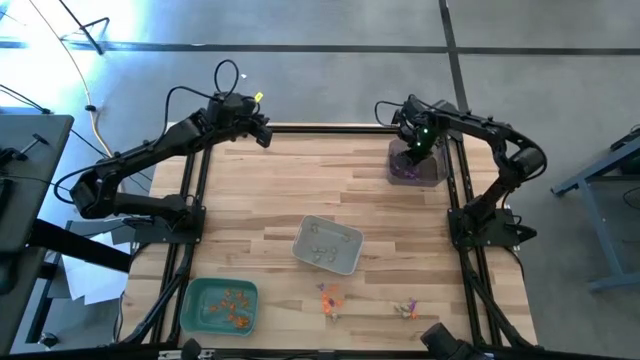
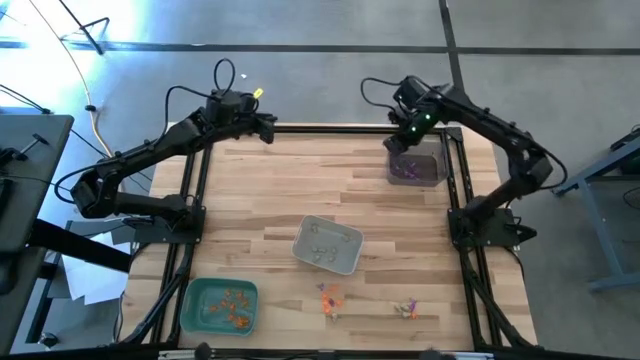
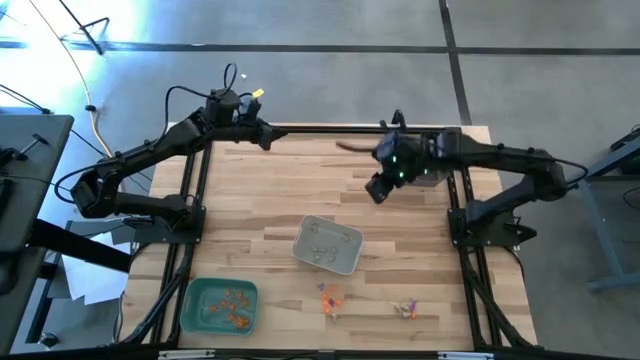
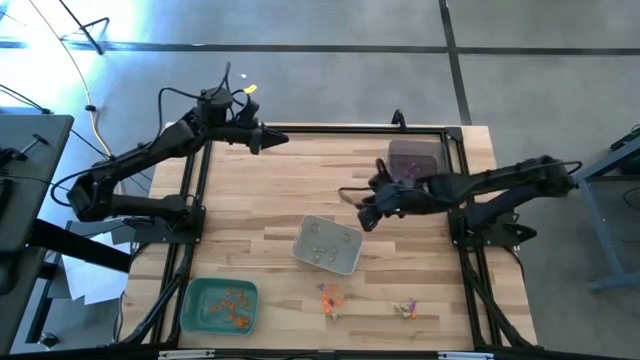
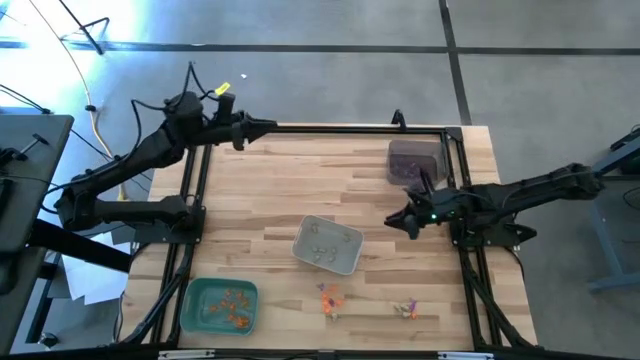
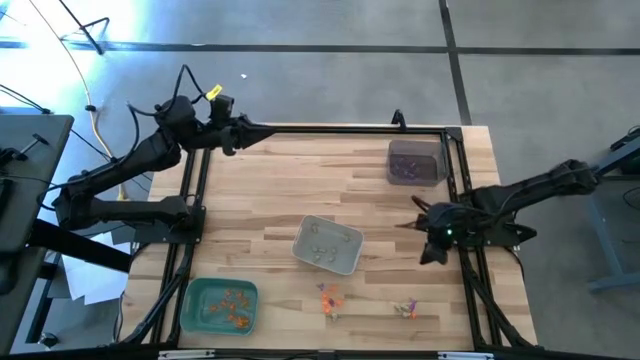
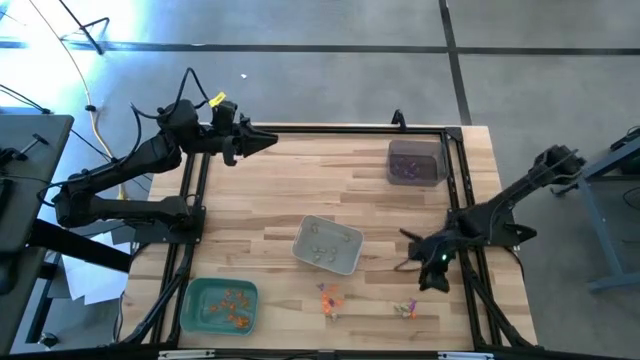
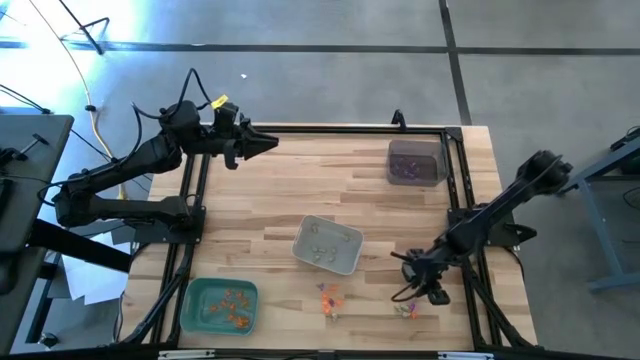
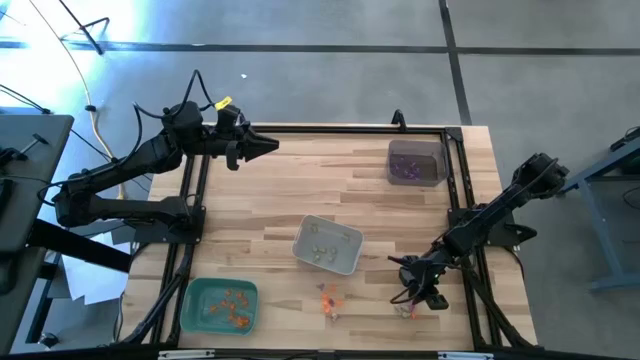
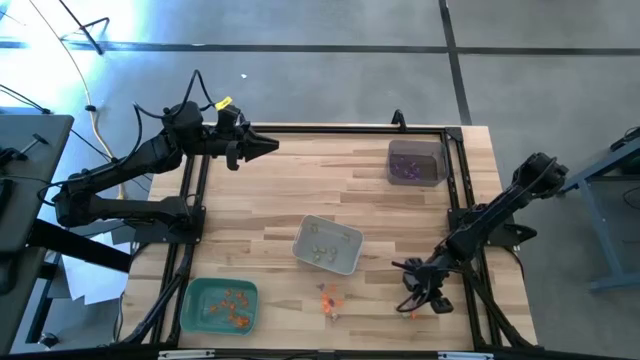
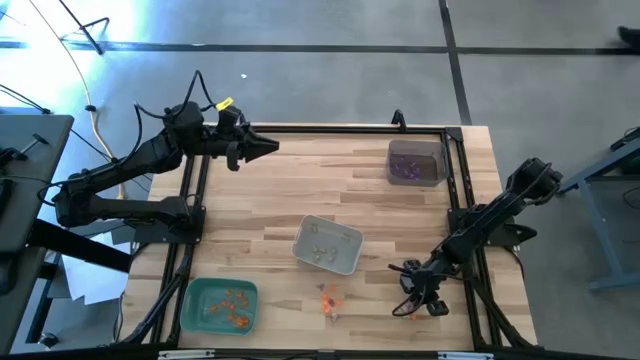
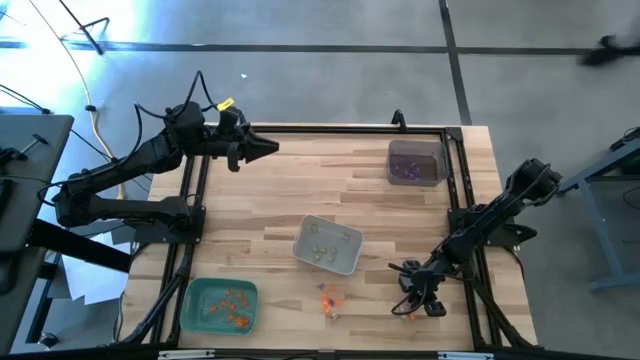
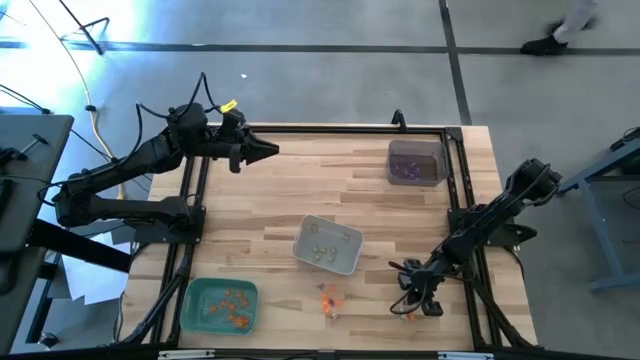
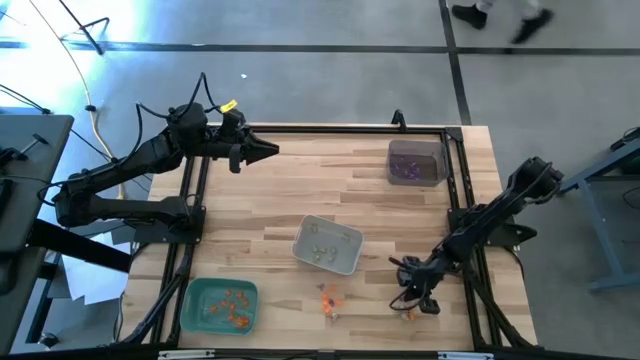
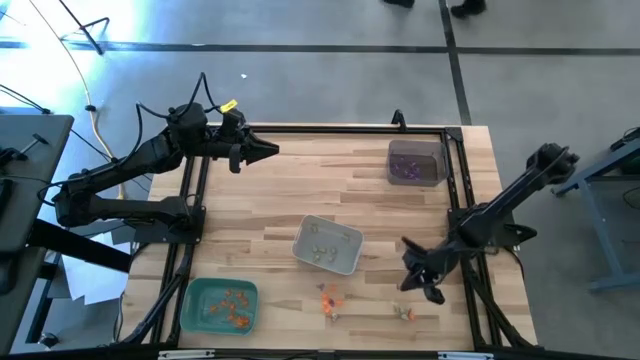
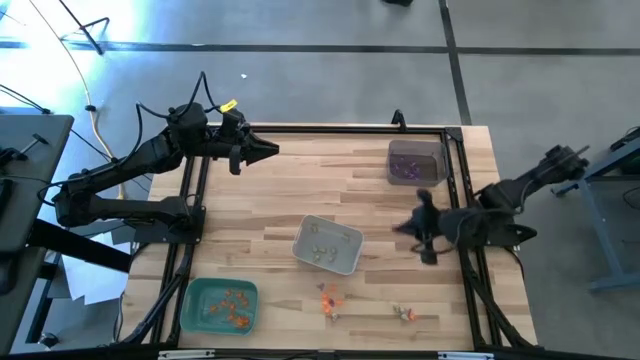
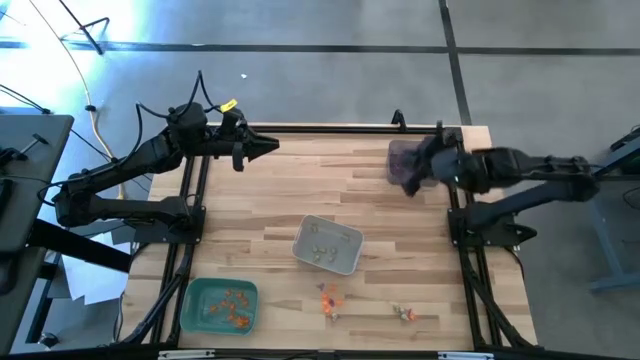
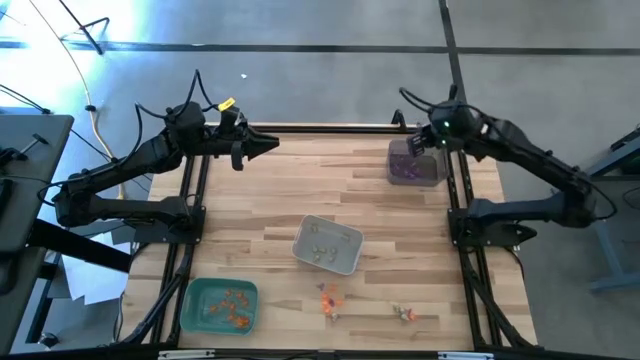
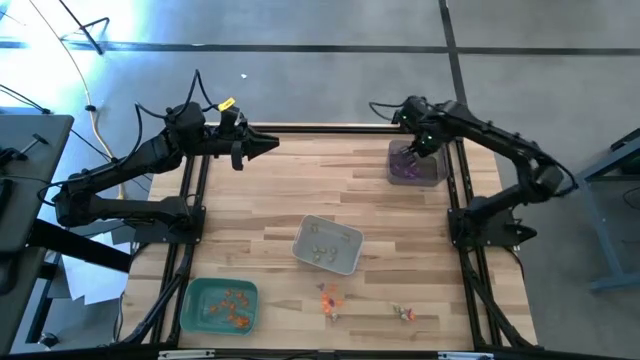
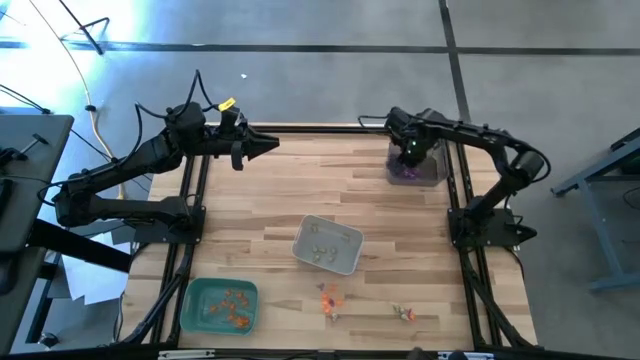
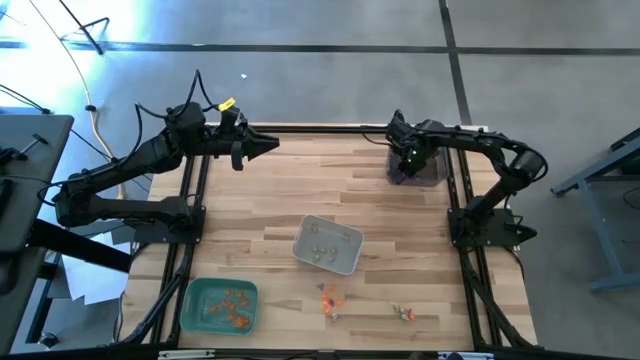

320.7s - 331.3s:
Task: Sort Halloween decoration
Put the violet witch hat toy into the black bin

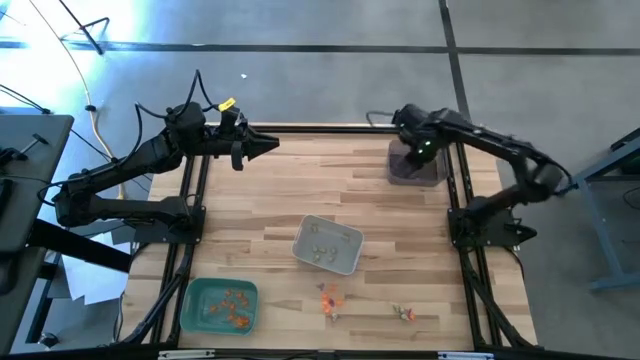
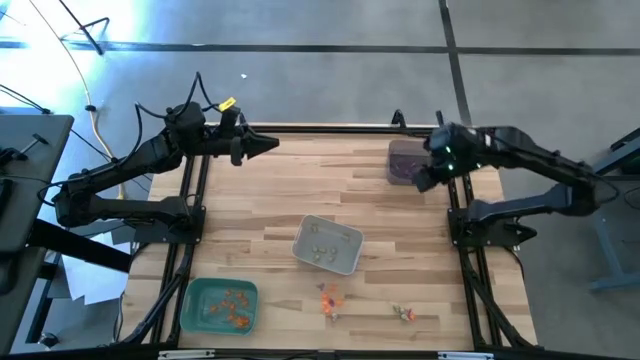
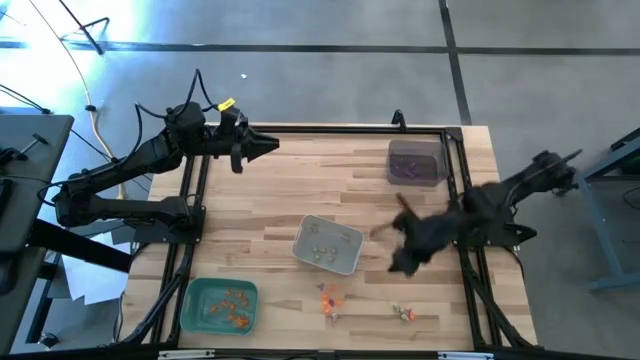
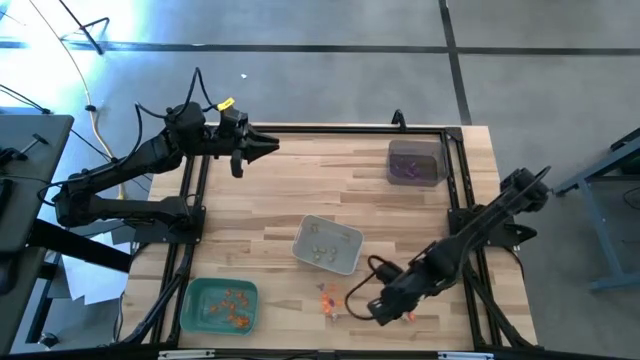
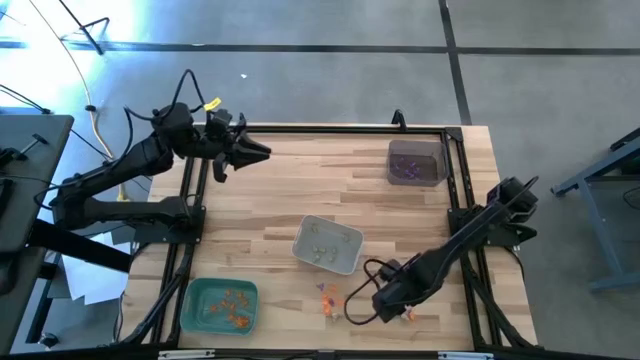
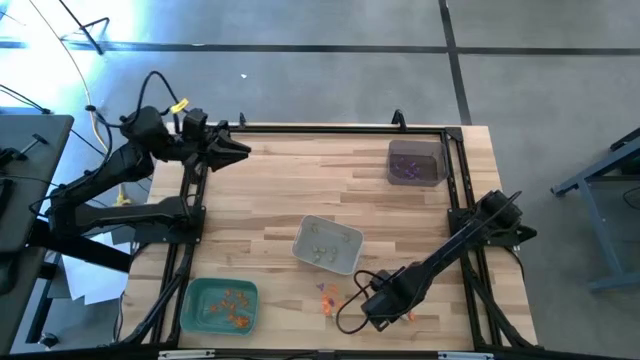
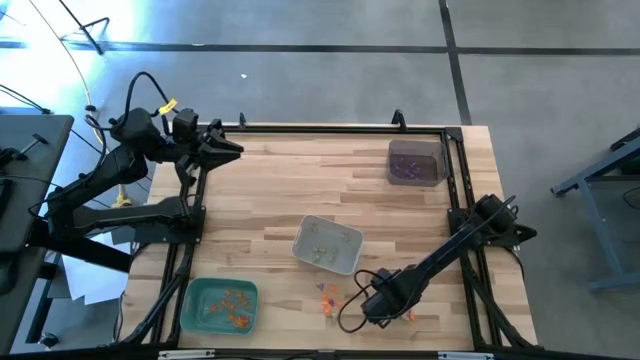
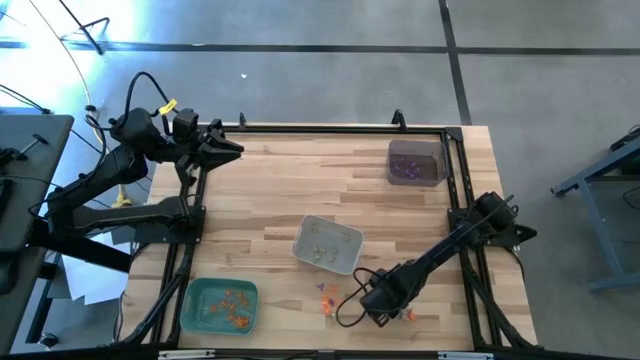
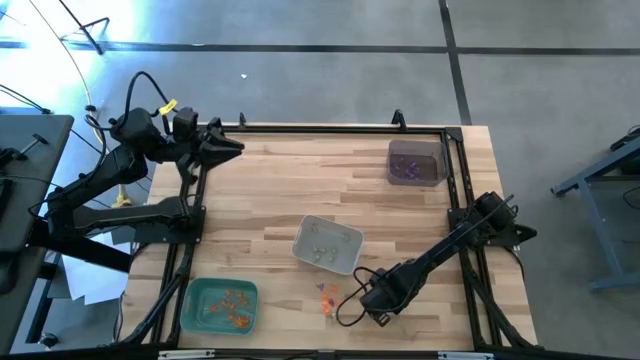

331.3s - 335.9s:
Put the white skull toy into the white bin

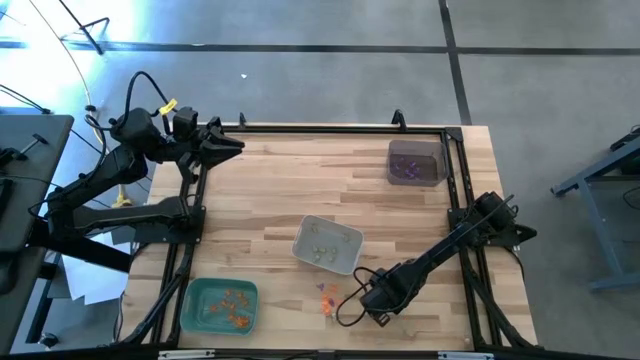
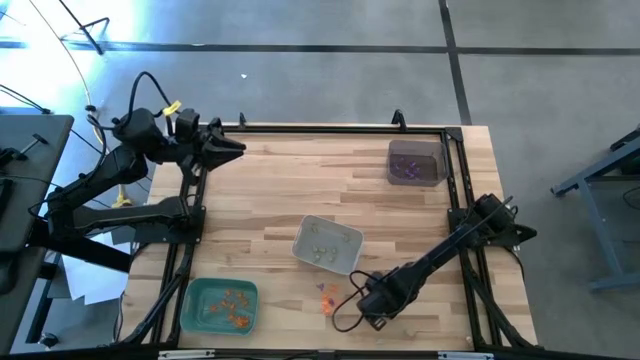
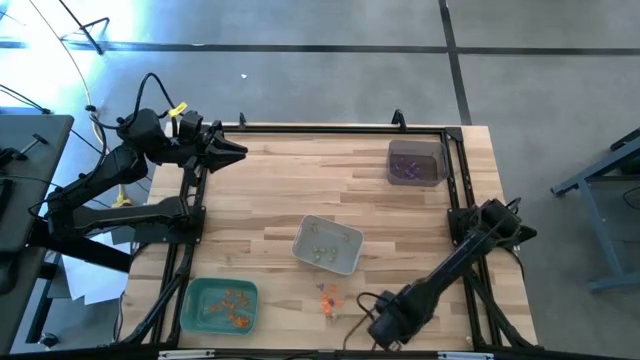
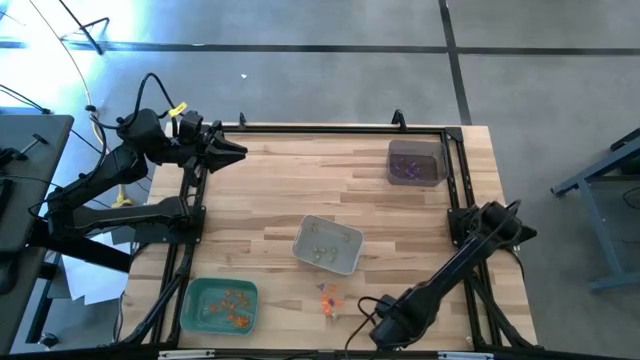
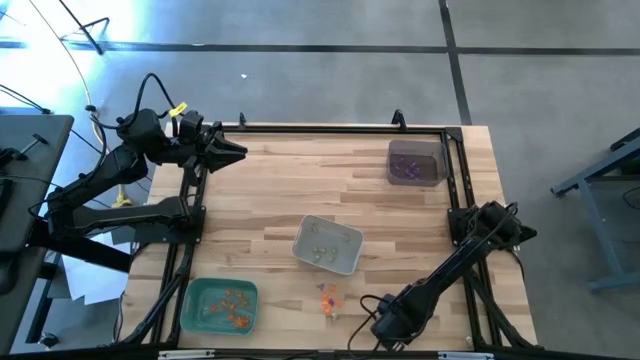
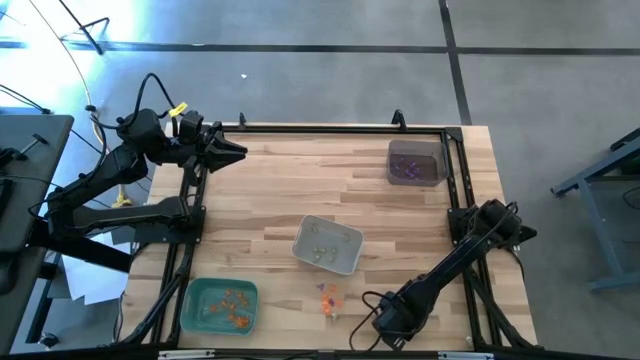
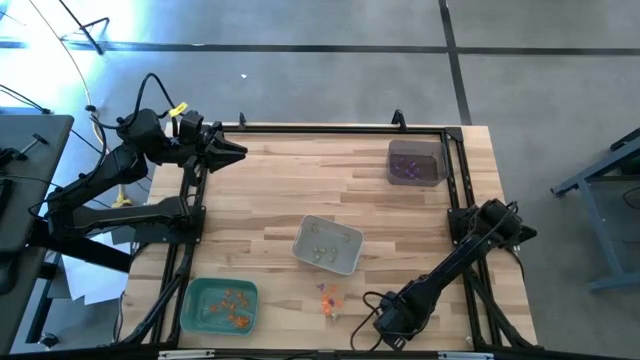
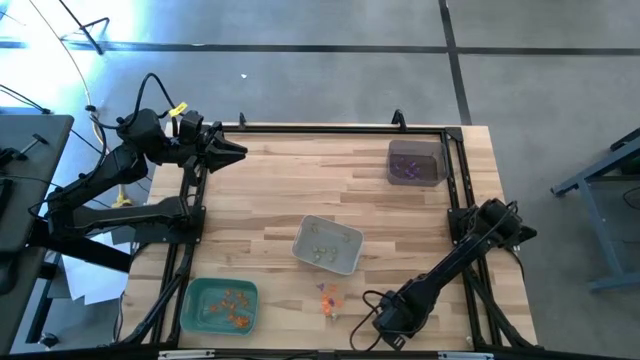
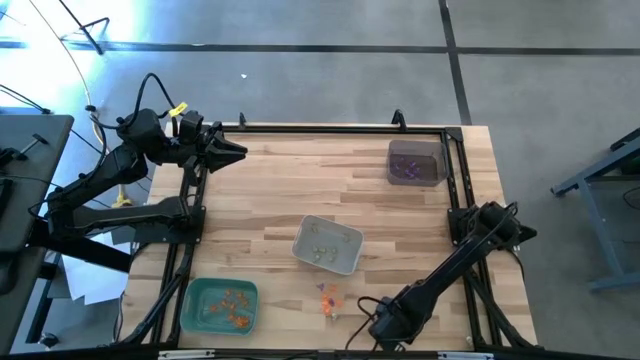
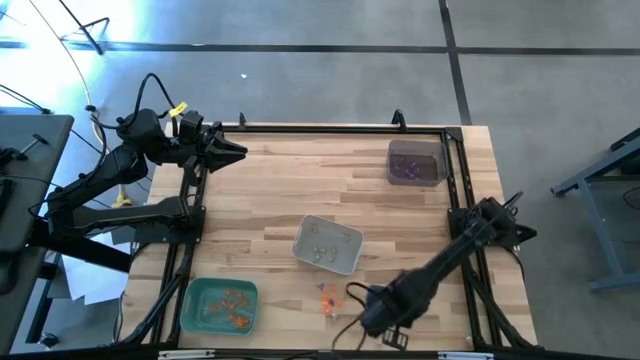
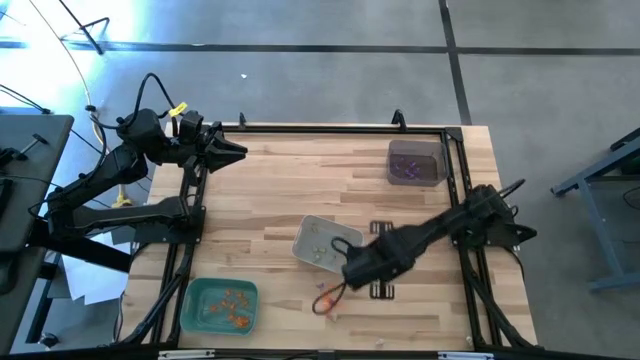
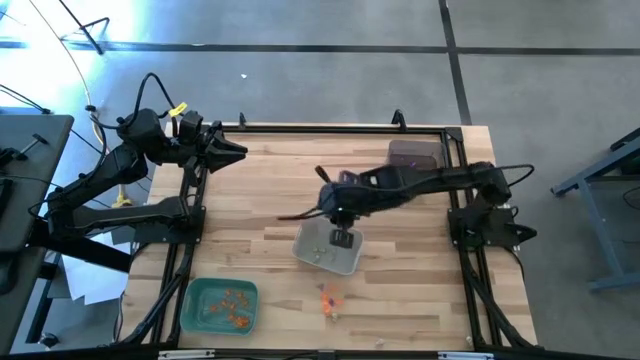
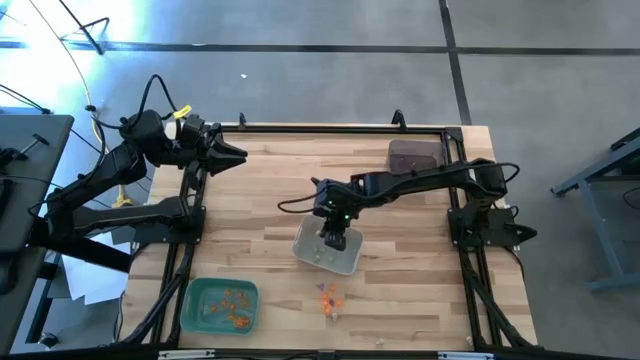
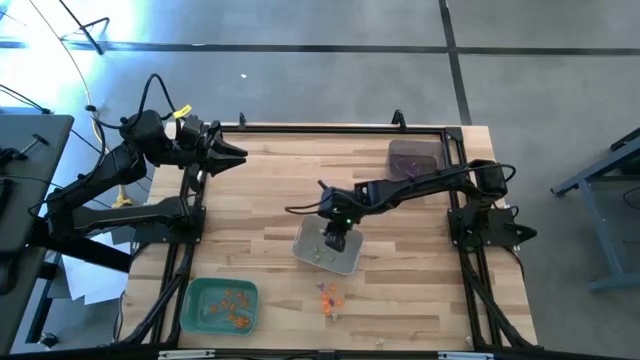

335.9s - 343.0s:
Put the white skull toy into the white bin
